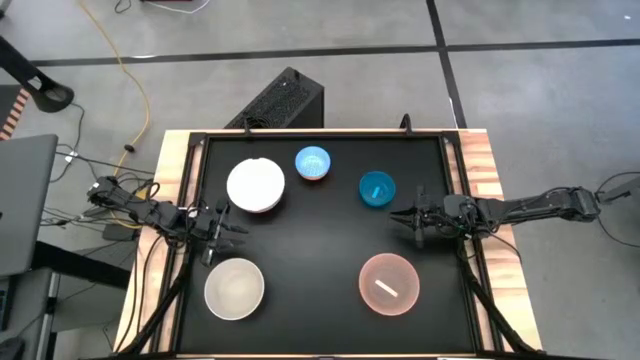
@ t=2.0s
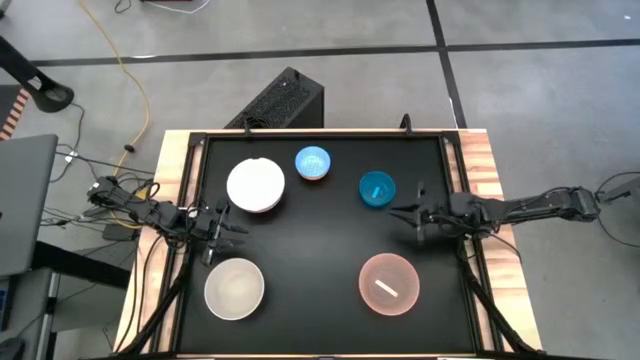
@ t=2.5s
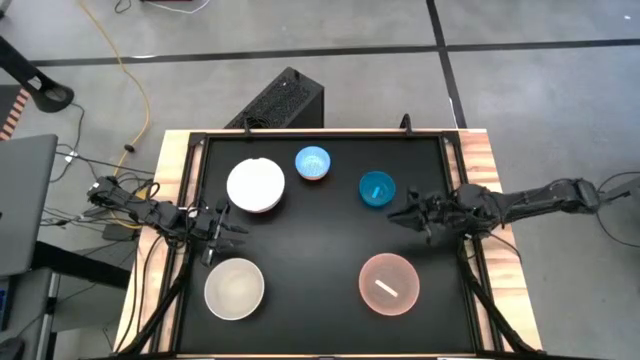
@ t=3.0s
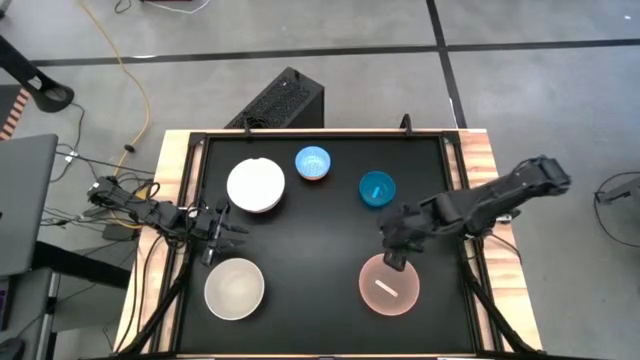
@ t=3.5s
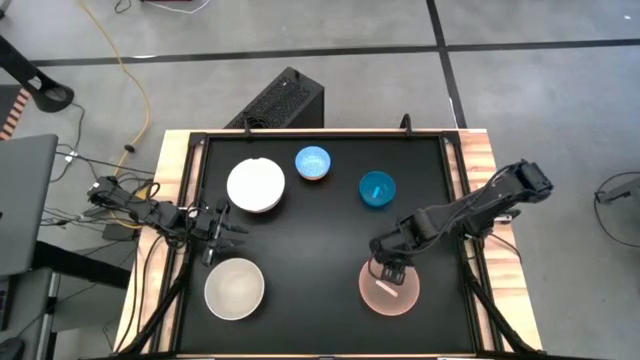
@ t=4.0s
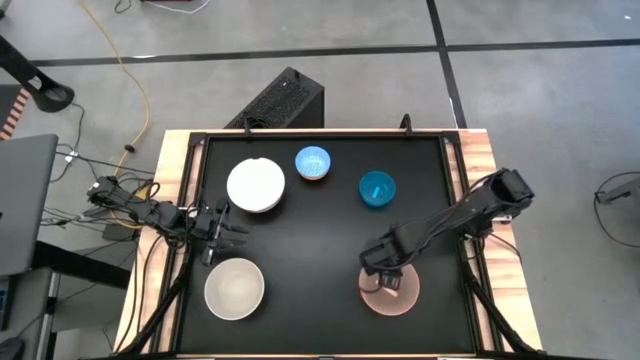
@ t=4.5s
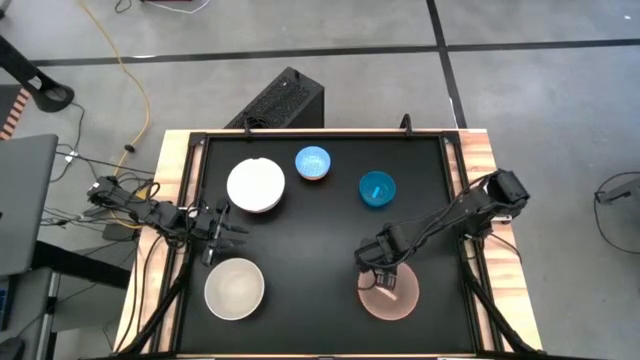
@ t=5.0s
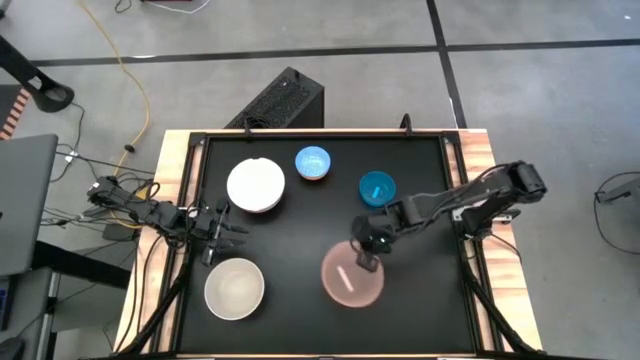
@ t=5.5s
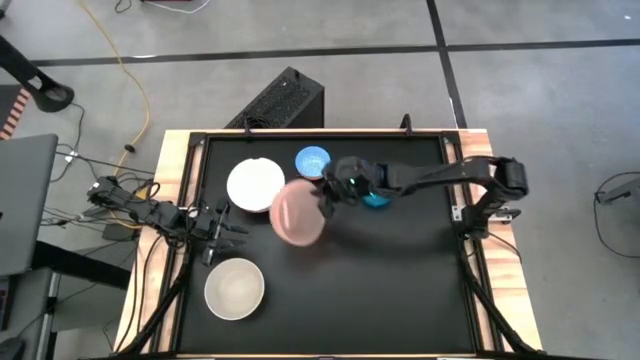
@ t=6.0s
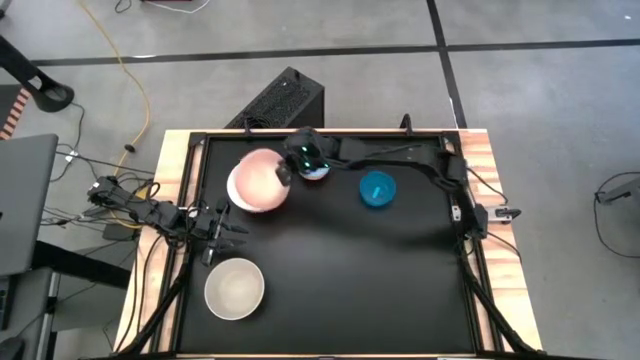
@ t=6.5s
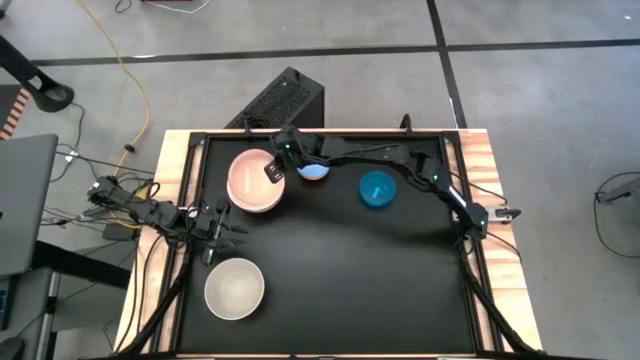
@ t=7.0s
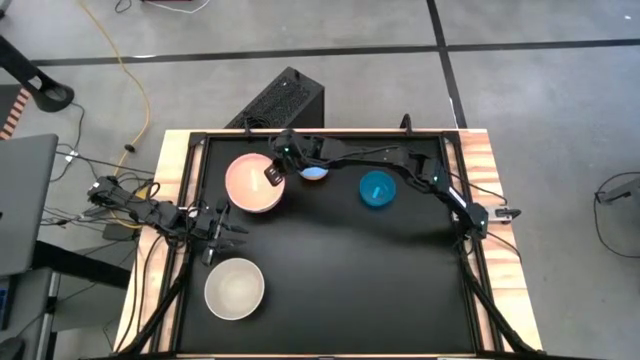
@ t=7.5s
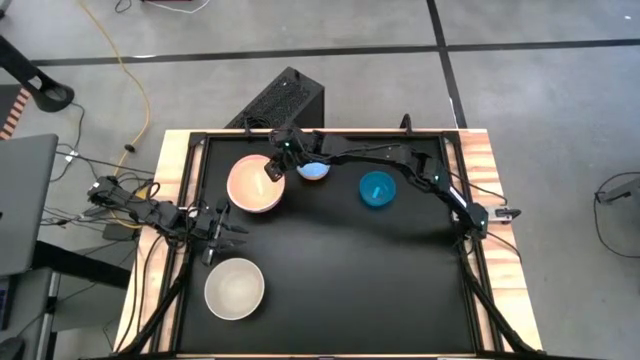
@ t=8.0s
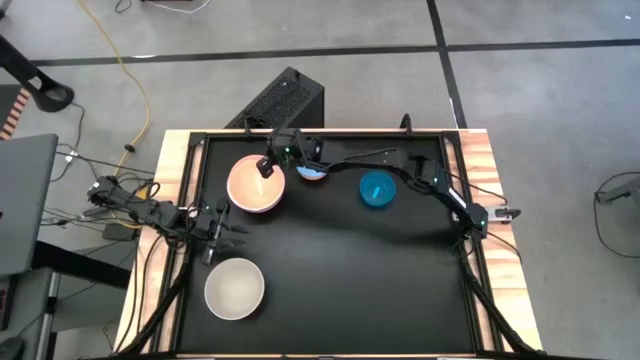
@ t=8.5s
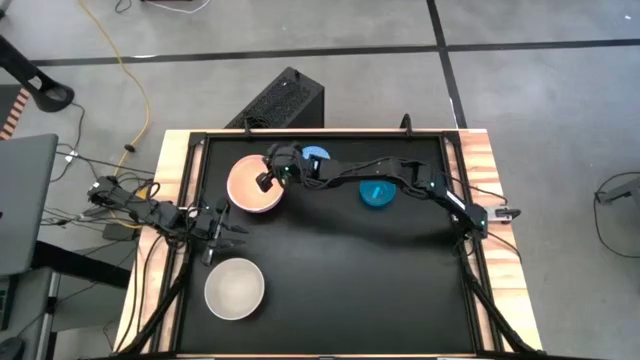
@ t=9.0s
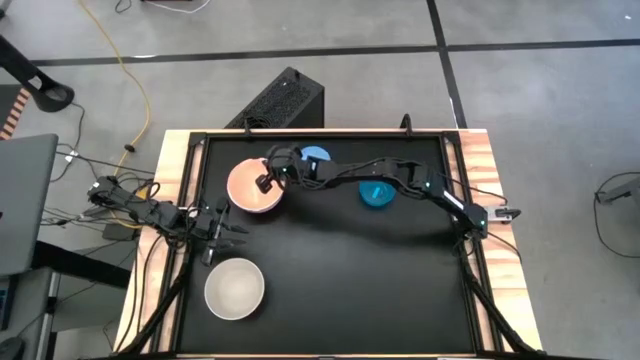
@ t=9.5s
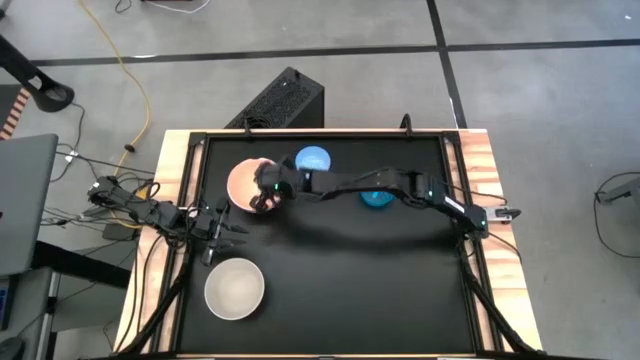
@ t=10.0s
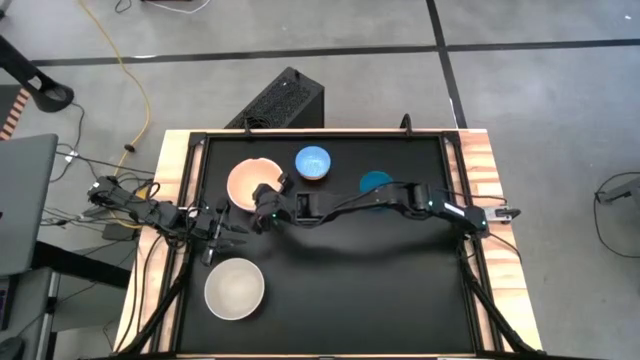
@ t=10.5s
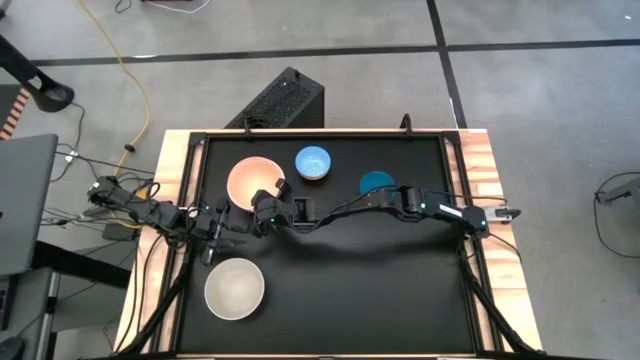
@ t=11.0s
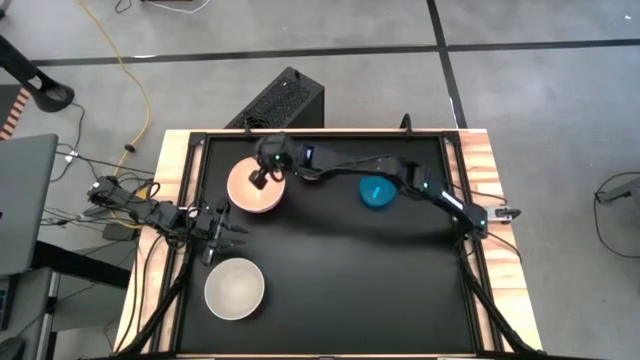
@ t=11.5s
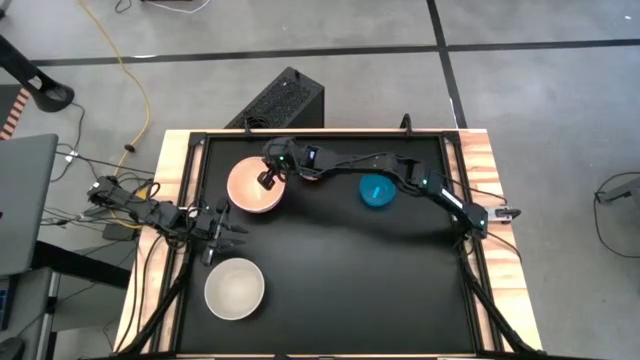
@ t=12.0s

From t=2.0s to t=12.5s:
Stack the orange bowl on top of the white bowl

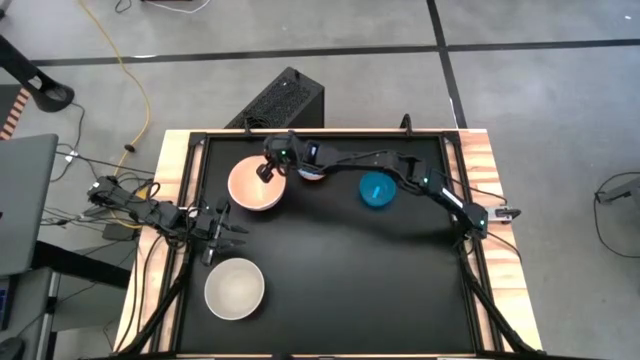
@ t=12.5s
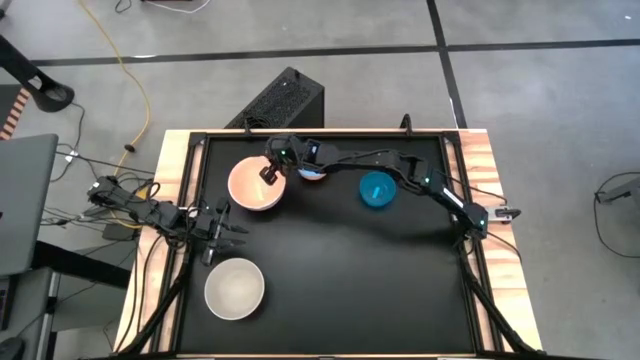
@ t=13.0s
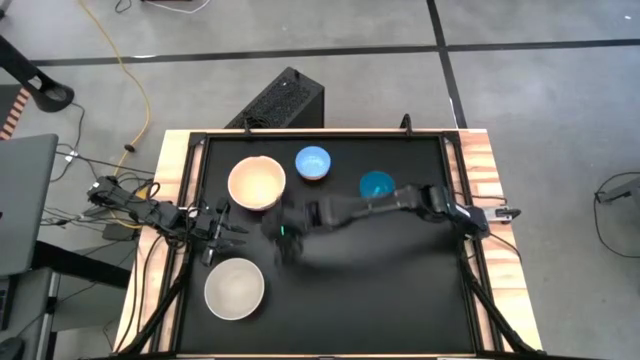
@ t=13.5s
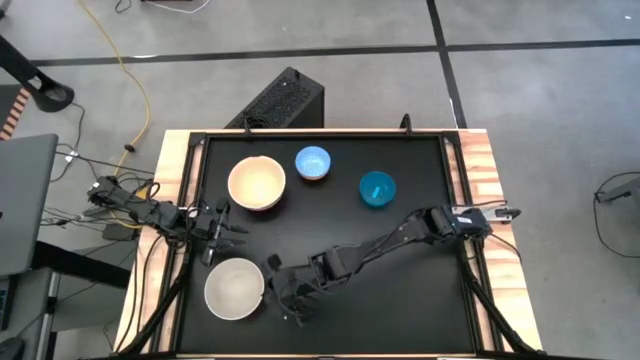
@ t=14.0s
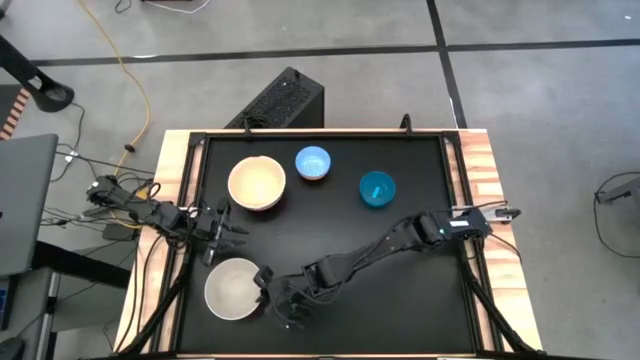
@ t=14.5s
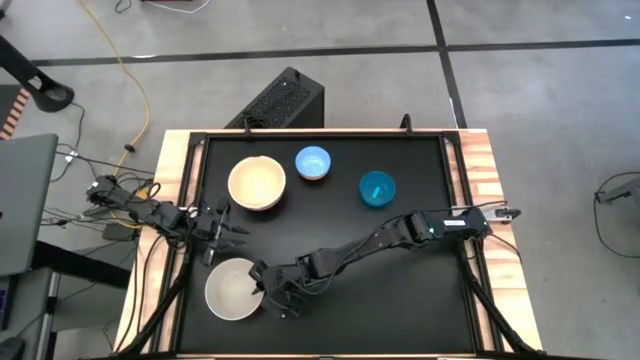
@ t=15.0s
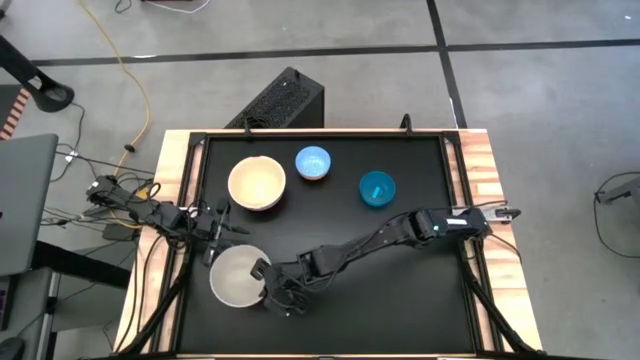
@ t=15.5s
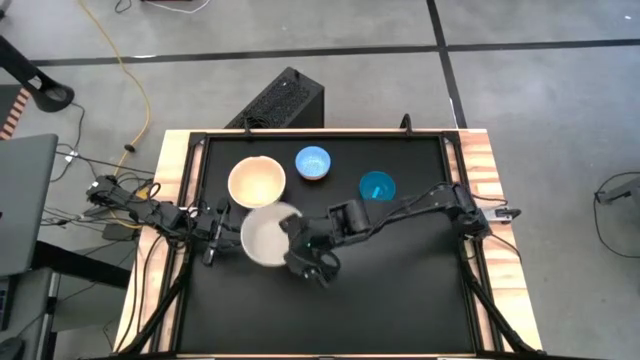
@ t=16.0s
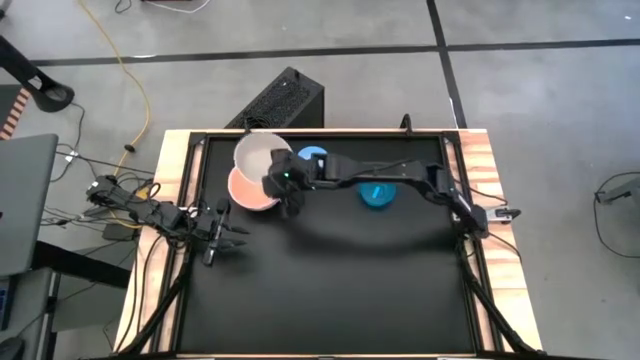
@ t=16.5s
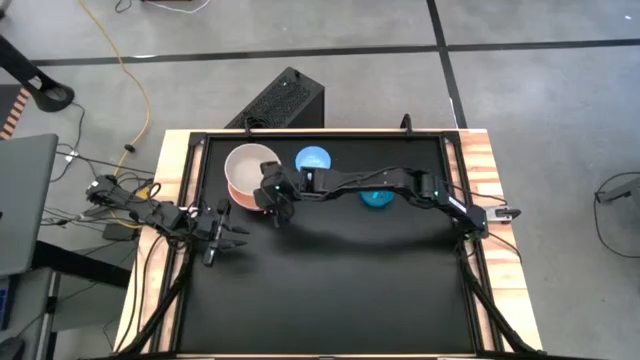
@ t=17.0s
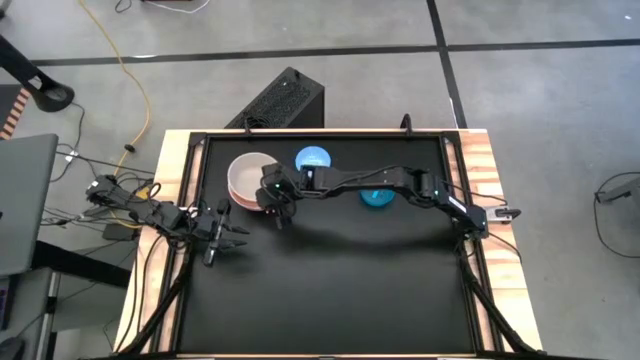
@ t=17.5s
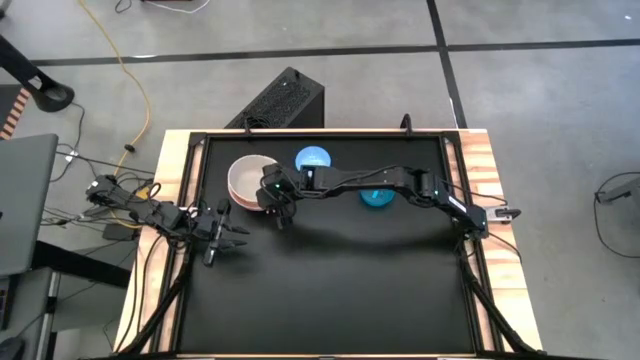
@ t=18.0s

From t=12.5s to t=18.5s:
Stack the white bowl on top of the orange bowl

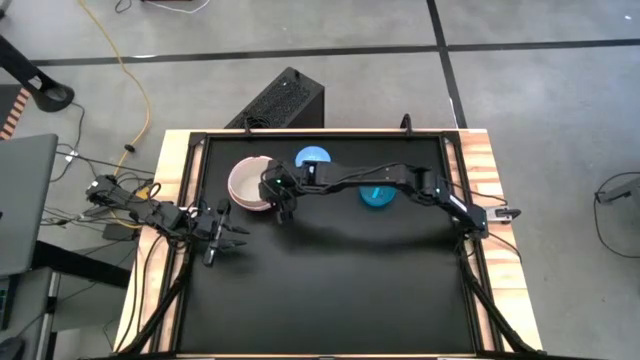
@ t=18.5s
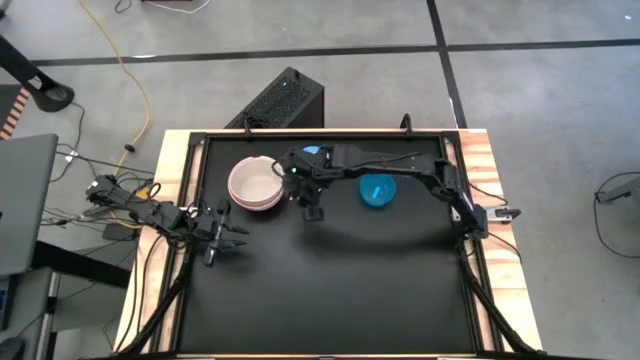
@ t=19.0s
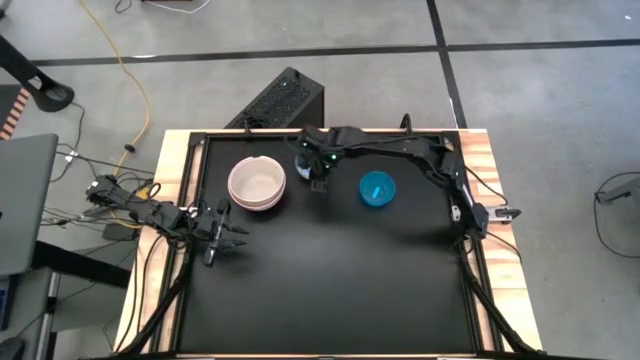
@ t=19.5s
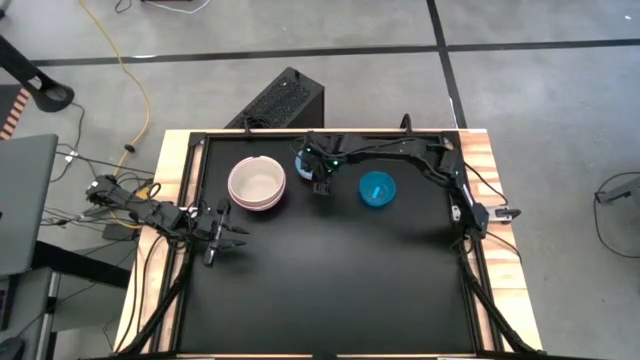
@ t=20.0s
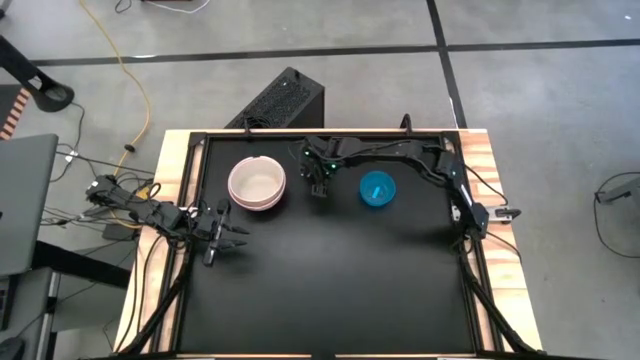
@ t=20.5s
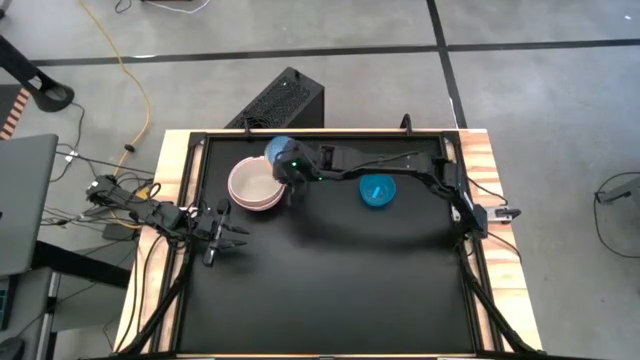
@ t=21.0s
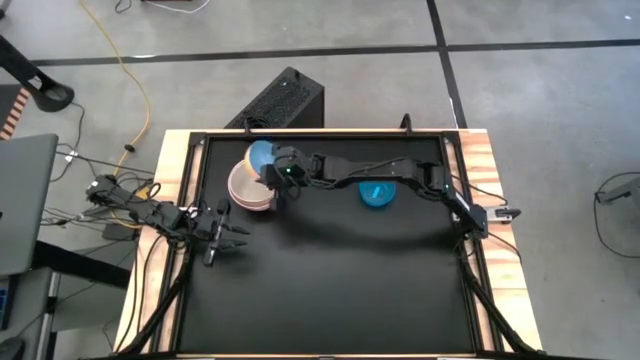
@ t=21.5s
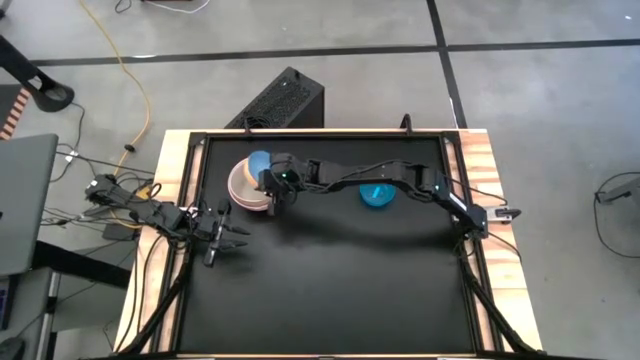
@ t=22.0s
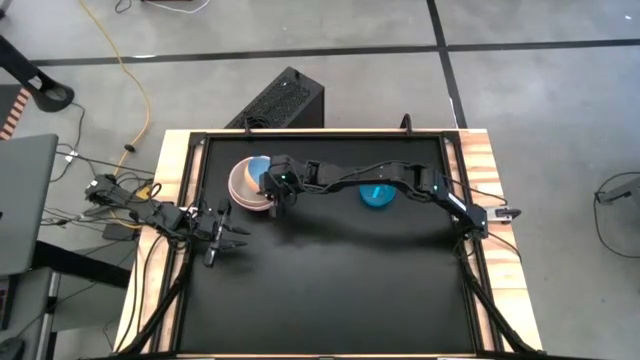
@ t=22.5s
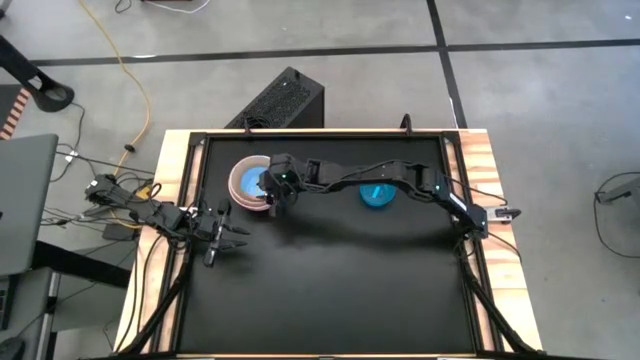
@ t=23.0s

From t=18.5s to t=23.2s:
Stack the blue patterned bowl on top of the white bowl

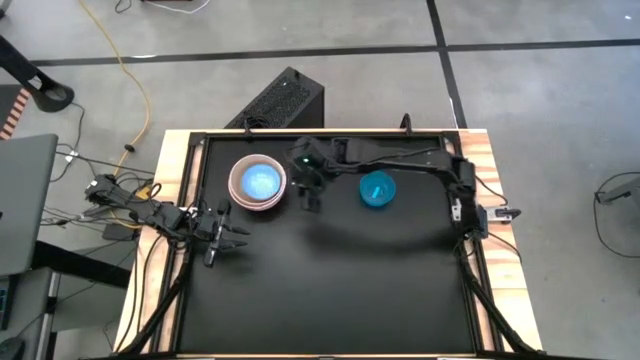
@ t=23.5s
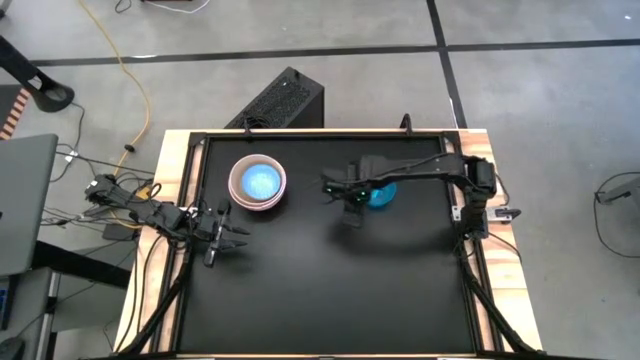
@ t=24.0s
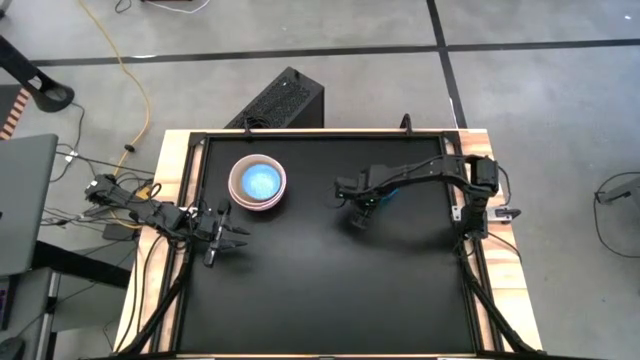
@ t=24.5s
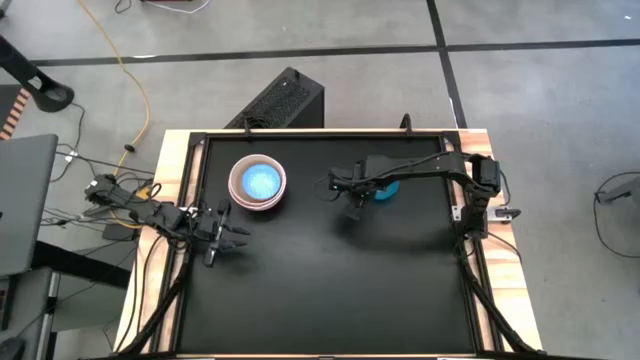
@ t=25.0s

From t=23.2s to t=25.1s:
Stack the blue bowl on top of the blue bowl
